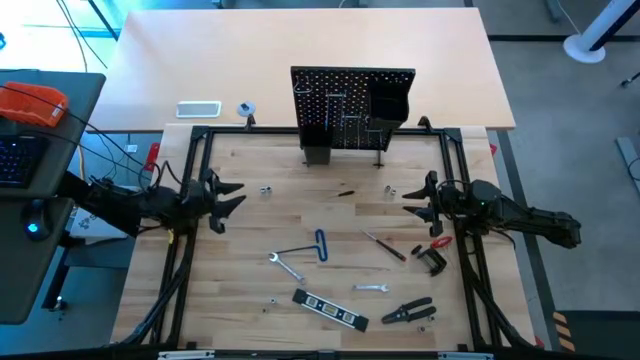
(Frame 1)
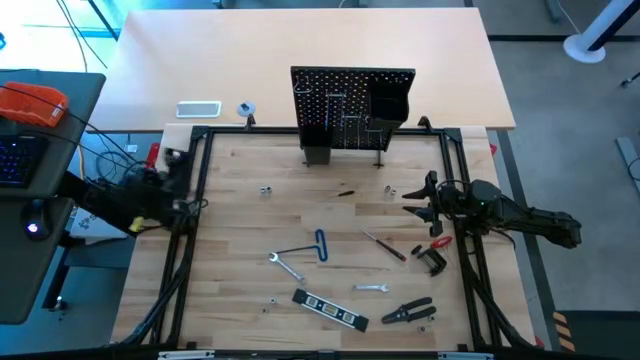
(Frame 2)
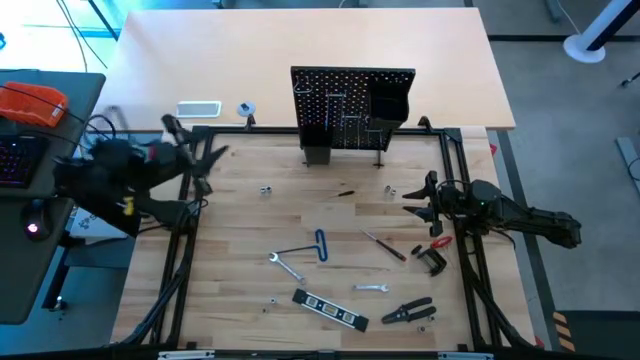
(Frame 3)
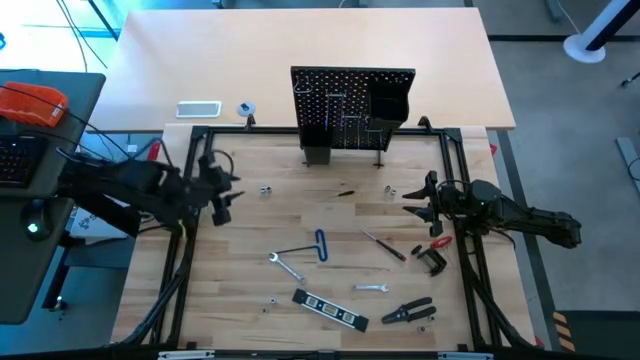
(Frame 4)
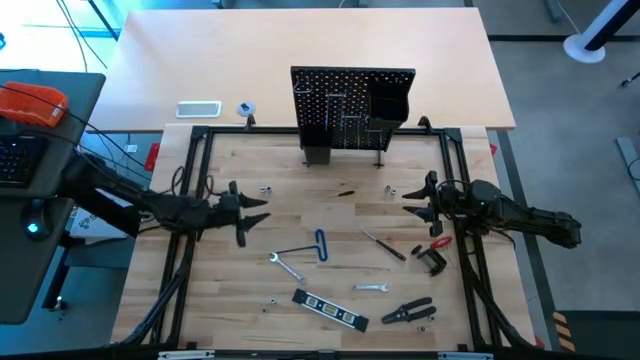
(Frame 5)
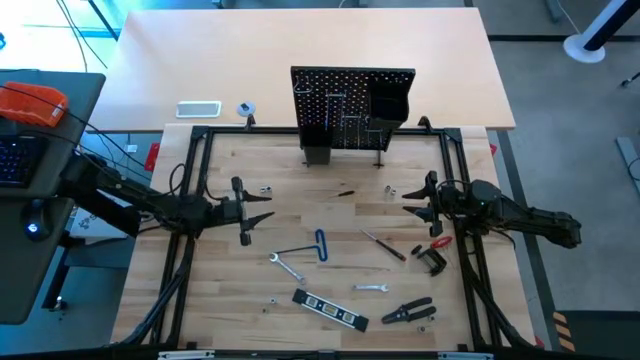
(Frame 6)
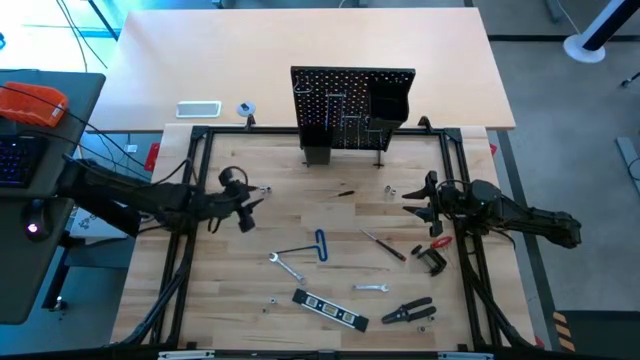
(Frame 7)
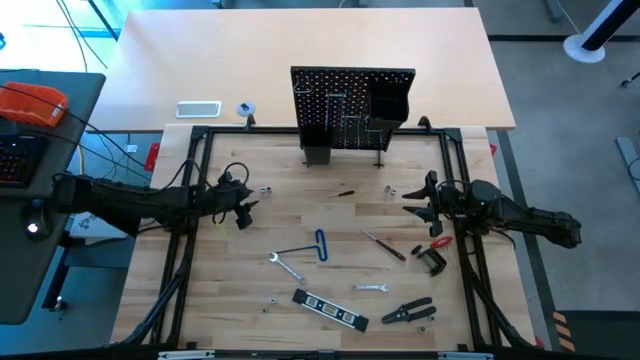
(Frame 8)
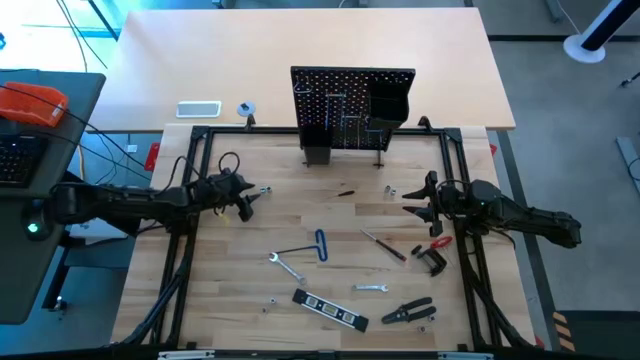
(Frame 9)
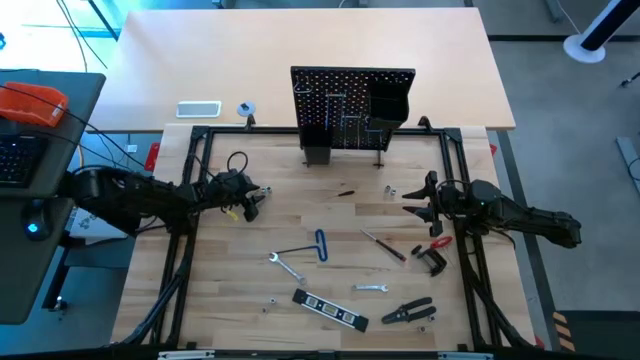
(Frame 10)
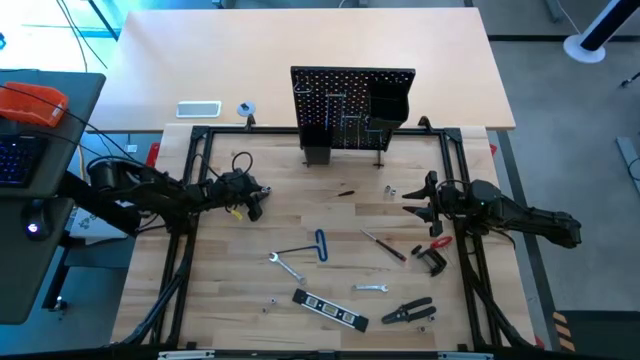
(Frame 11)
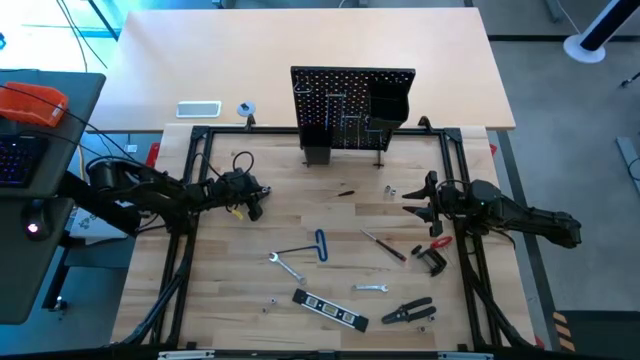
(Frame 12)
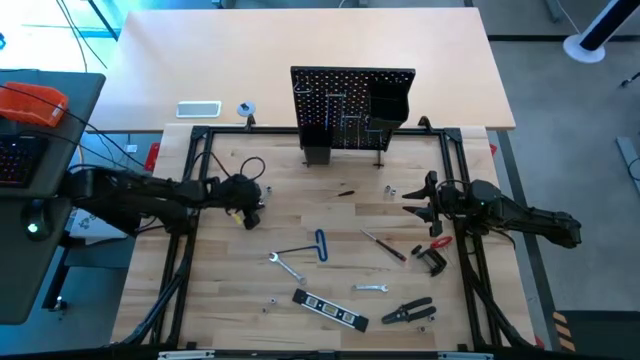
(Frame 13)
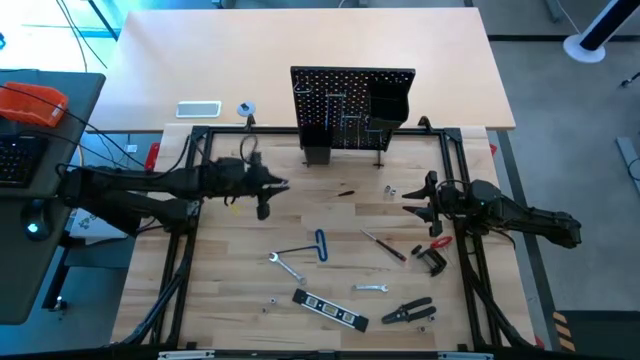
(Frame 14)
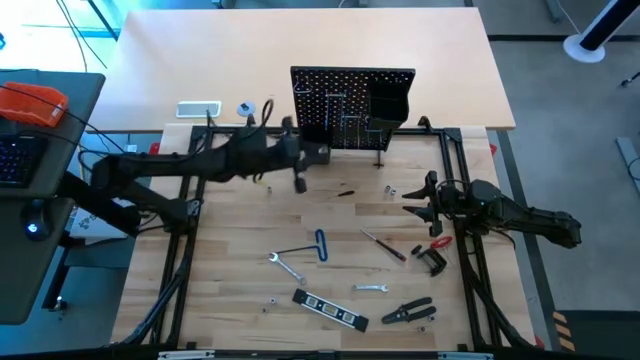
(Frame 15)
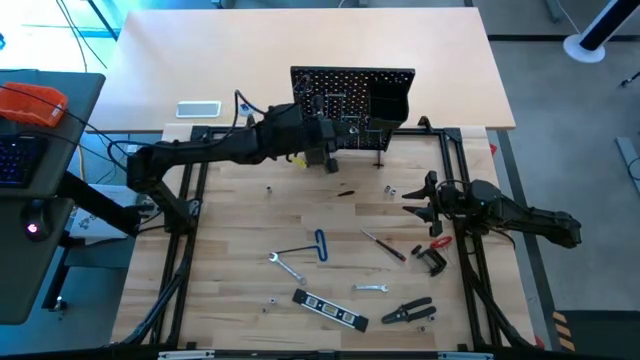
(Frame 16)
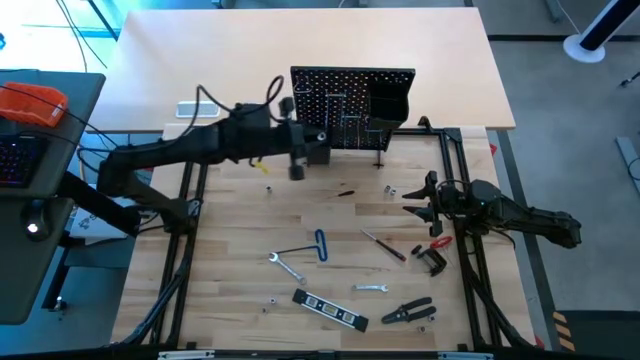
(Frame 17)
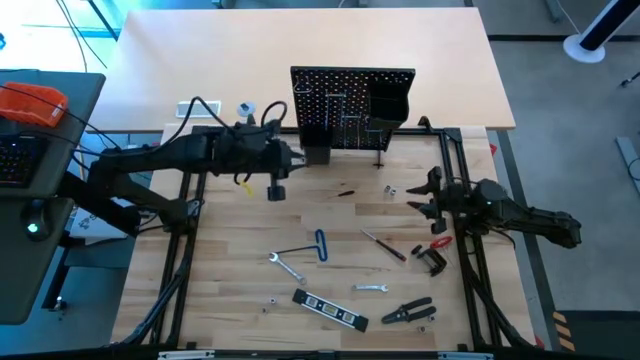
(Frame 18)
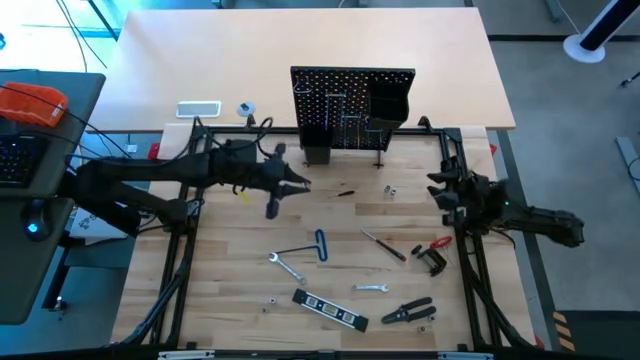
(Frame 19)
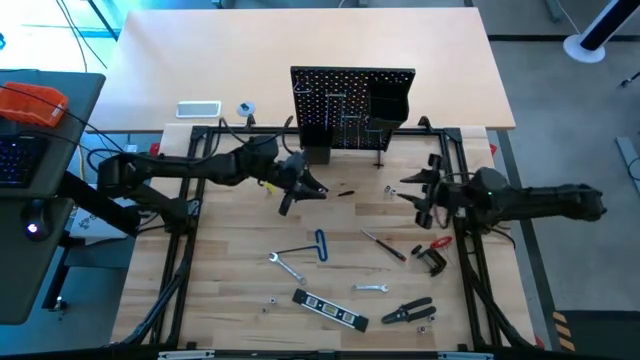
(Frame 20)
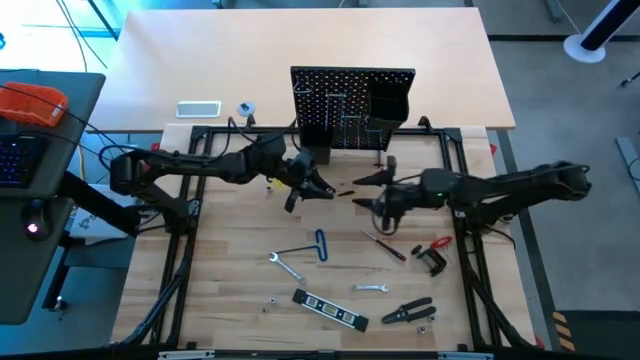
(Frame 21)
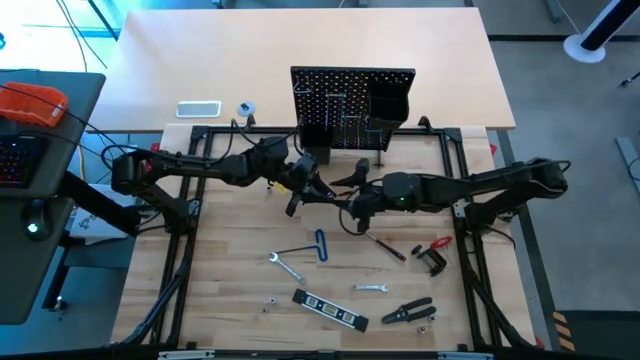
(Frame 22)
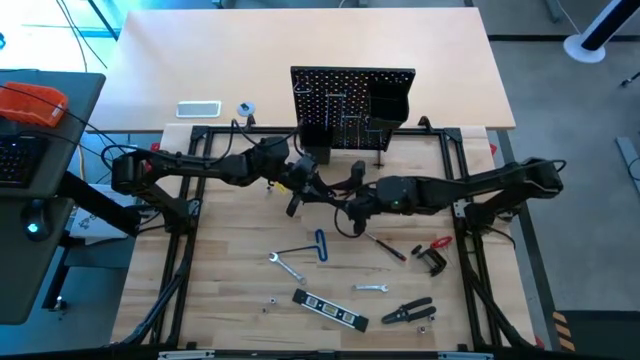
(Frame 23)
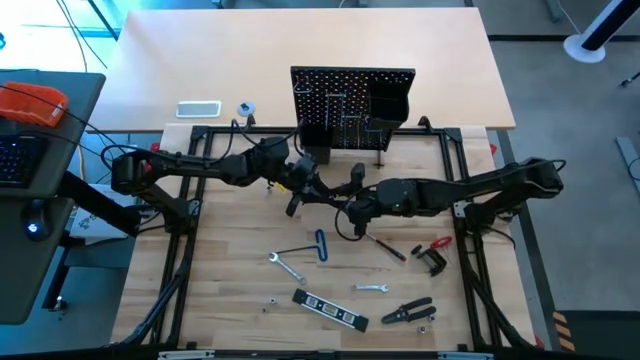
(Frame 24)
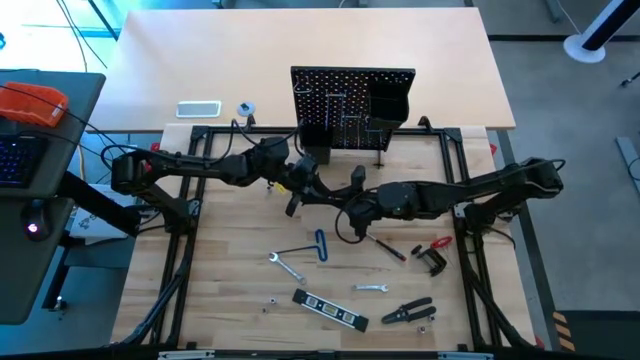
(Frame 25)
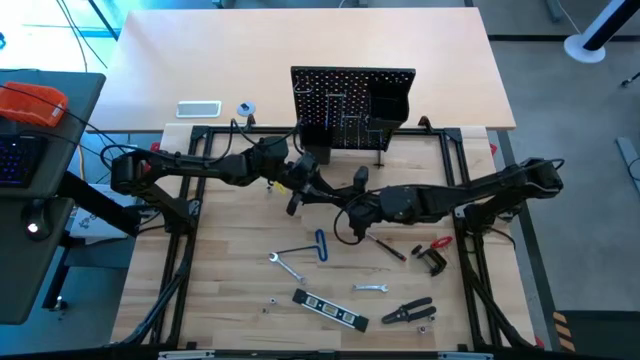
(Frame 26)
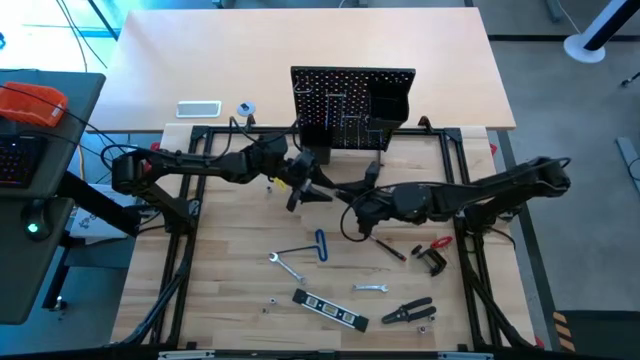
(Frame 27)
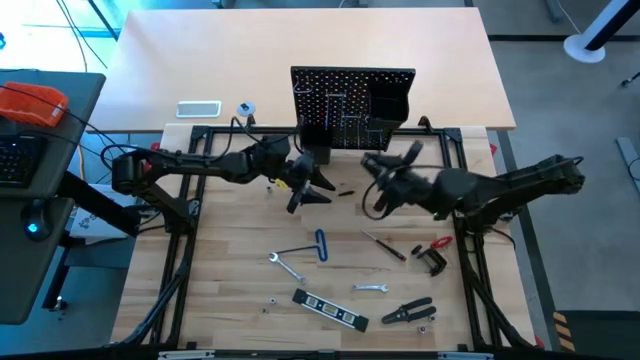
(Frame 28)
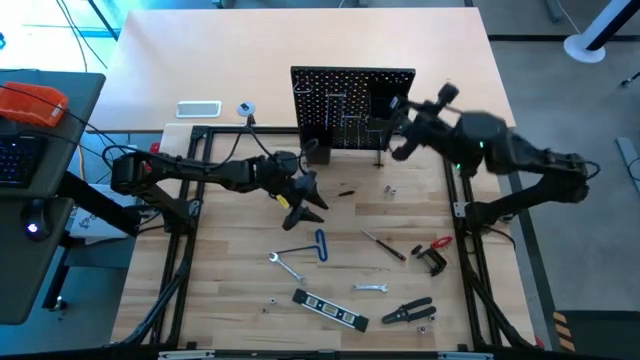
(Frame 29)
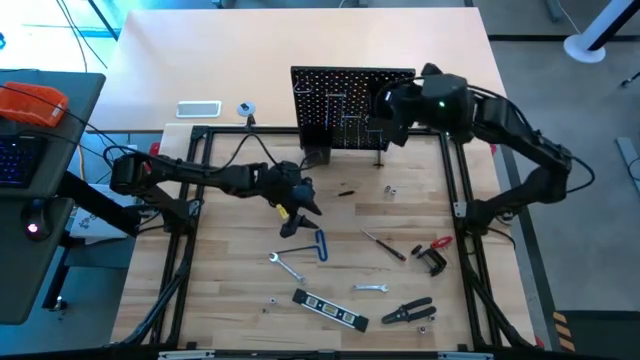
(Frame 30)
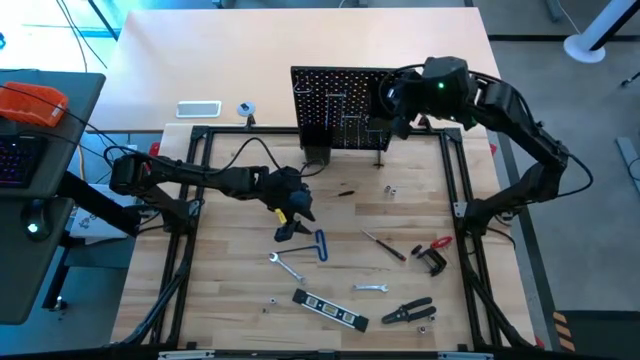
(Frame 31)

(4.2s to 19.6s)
Task: Hang tools onto peg board
Put the bolts on the pegboard

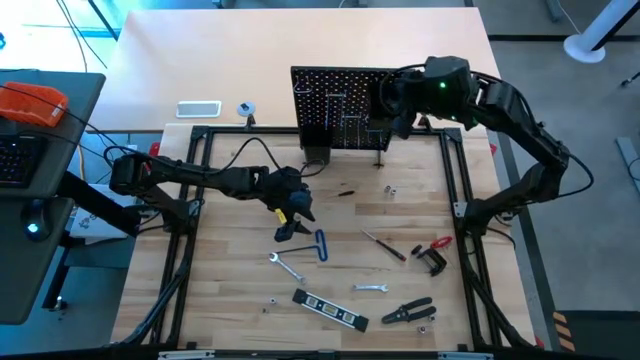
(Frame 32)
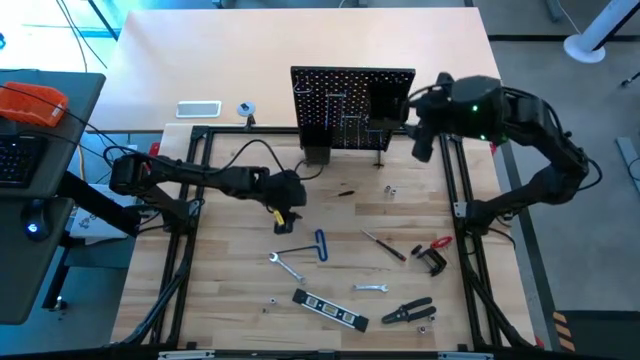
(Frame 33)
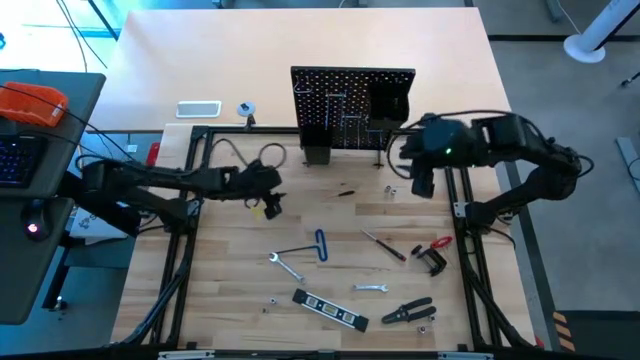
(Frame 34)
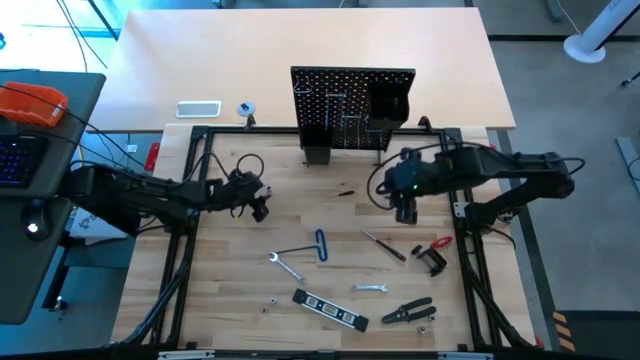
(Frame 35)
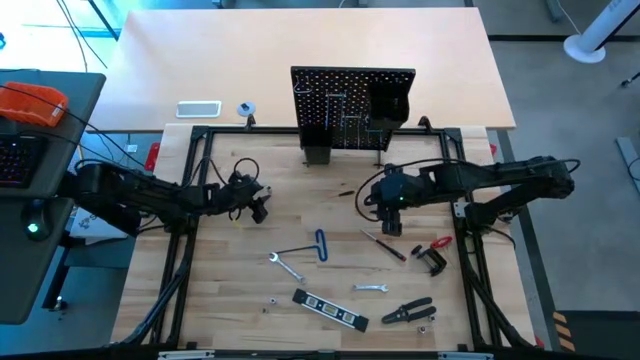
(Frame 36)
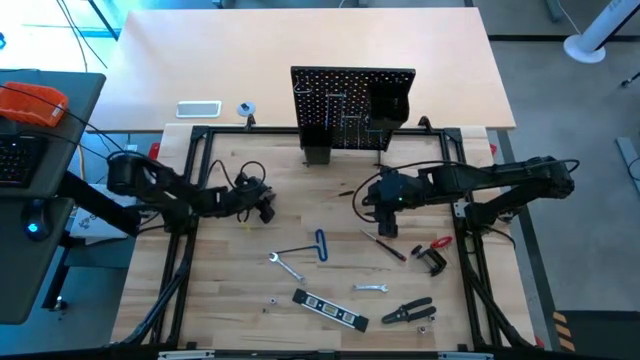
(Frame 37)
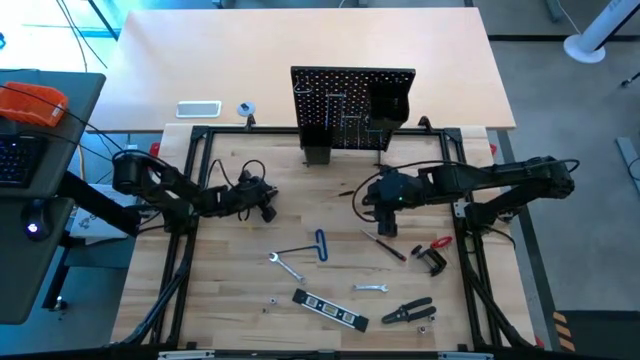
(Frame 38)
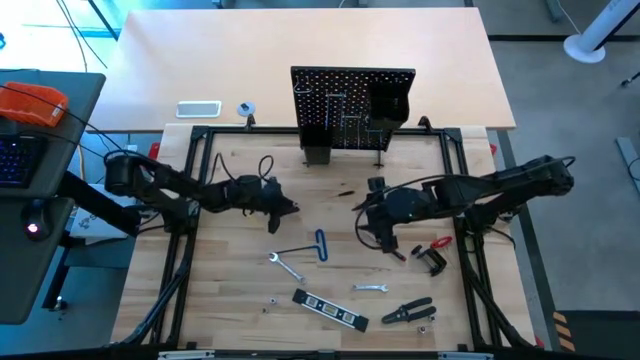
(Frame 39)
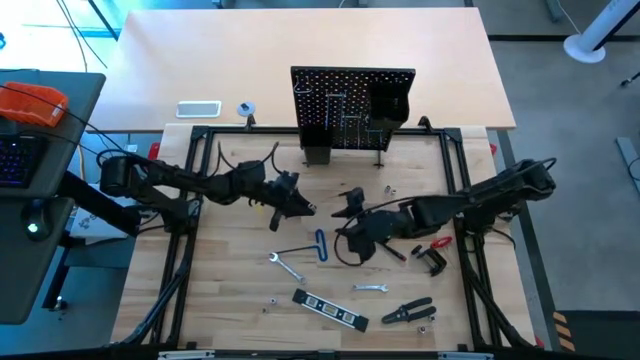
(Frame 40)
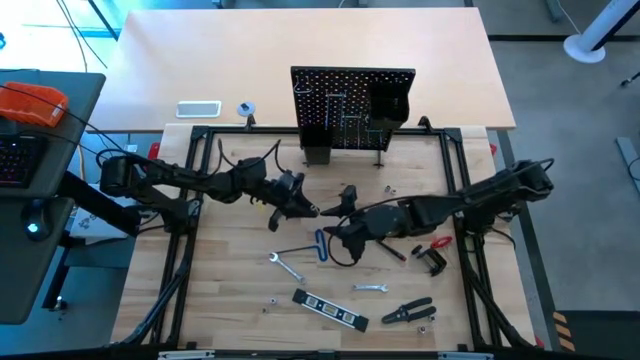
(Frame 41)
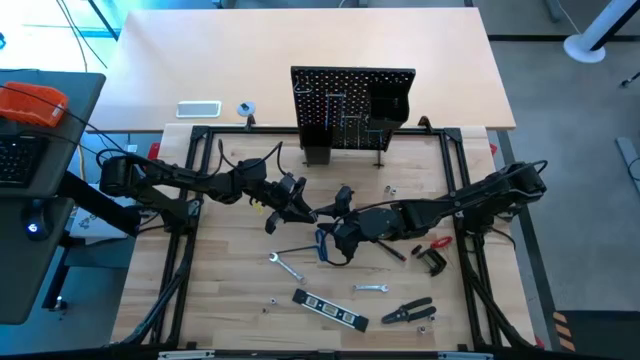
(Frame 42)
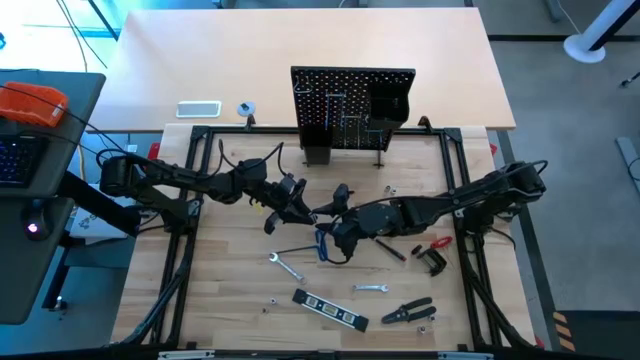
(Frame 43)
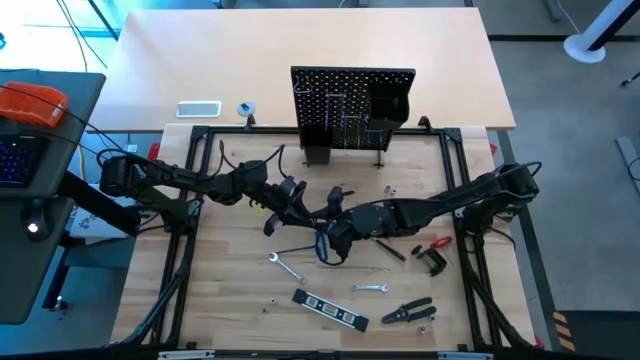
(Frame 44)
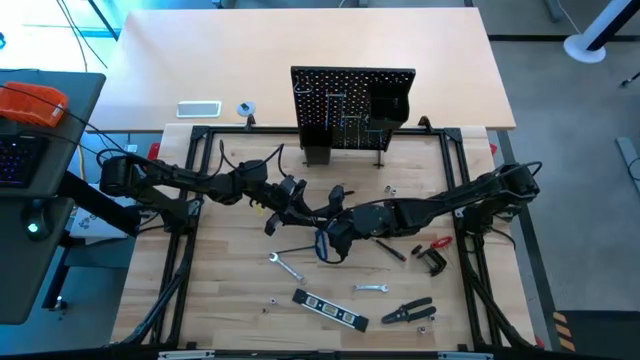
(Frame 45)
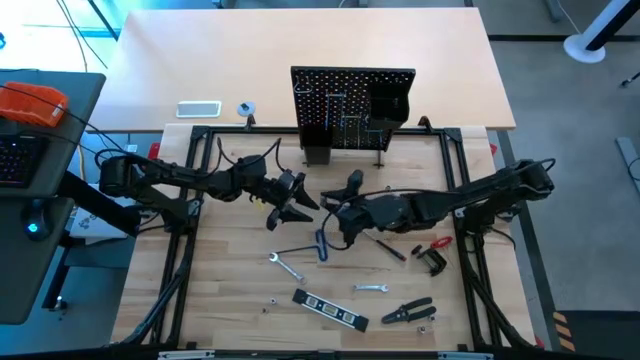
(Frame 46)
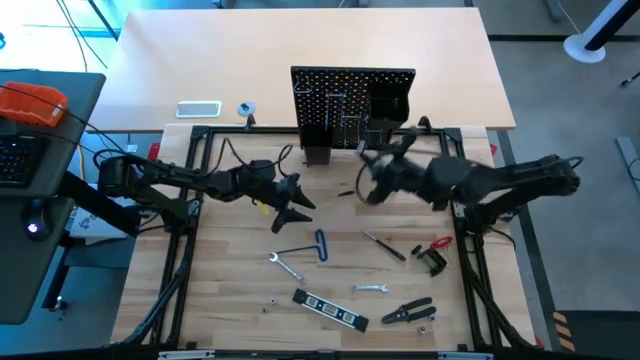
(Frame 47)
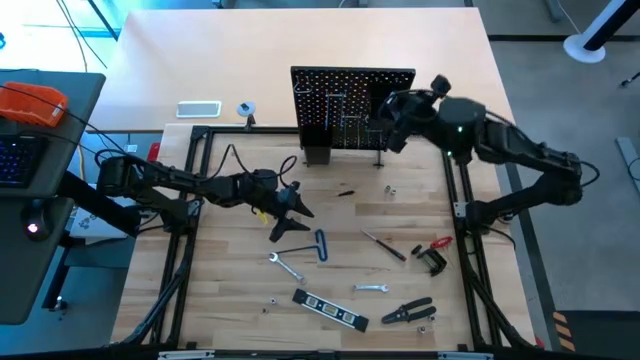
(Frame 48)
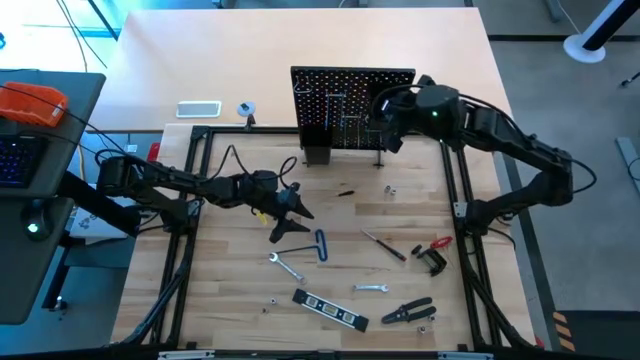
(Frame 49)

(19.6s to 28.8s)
Put the bolts on the pegboard
